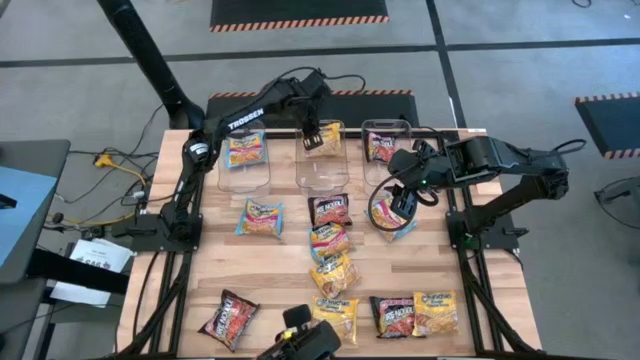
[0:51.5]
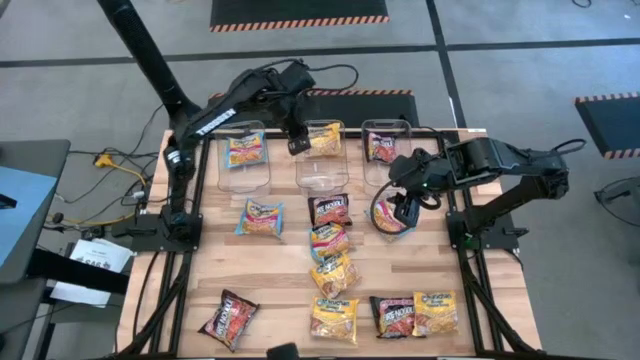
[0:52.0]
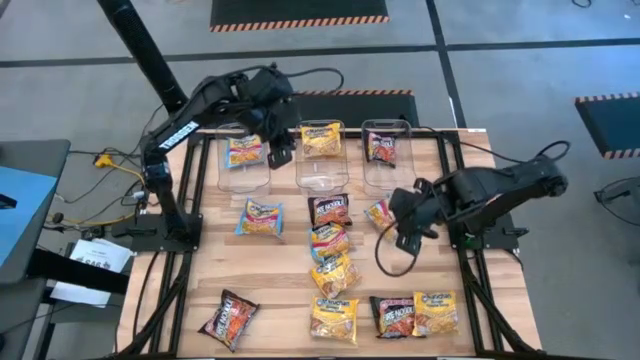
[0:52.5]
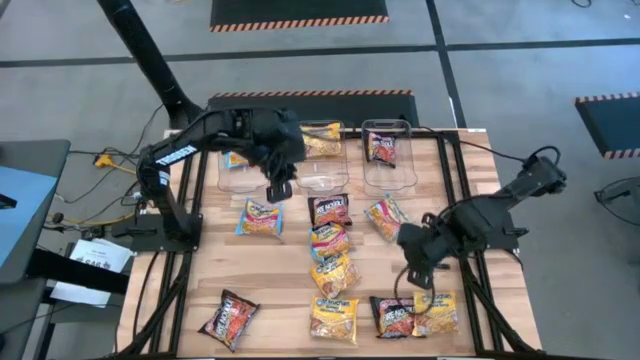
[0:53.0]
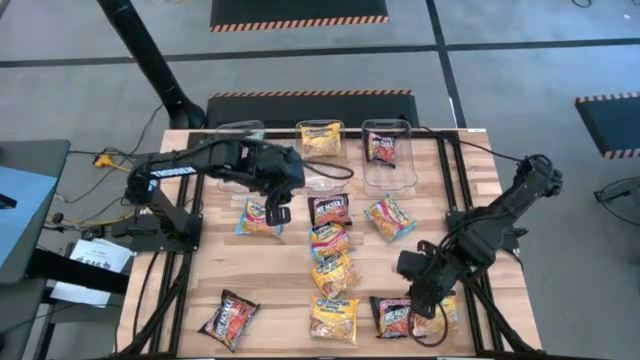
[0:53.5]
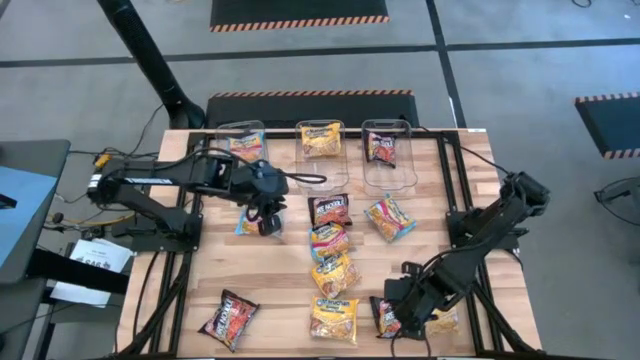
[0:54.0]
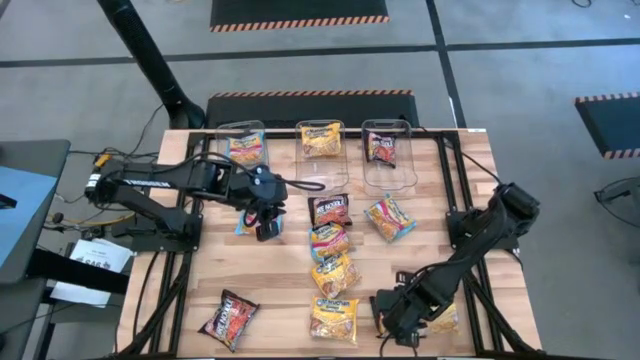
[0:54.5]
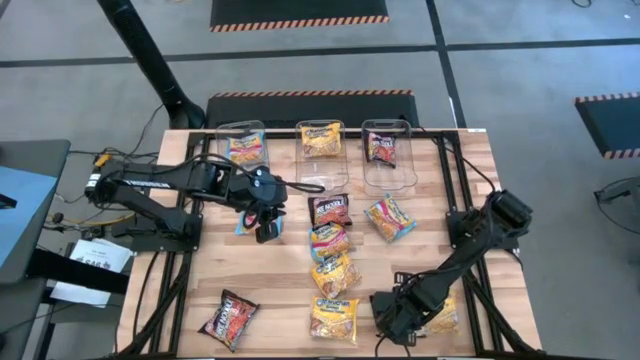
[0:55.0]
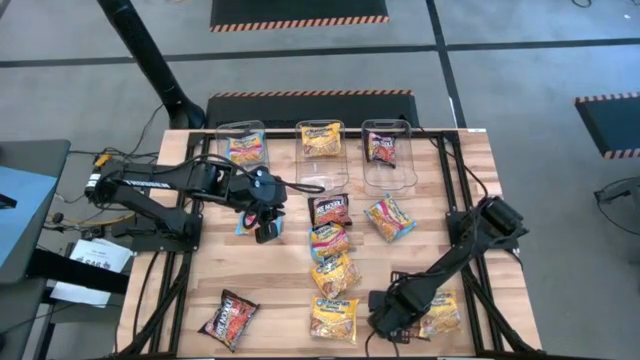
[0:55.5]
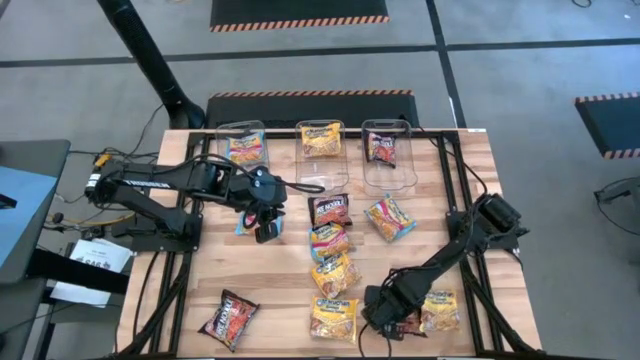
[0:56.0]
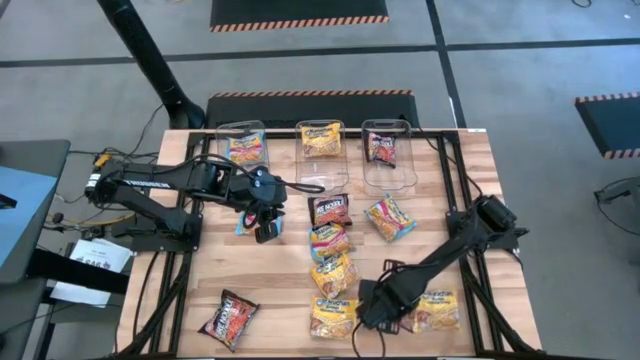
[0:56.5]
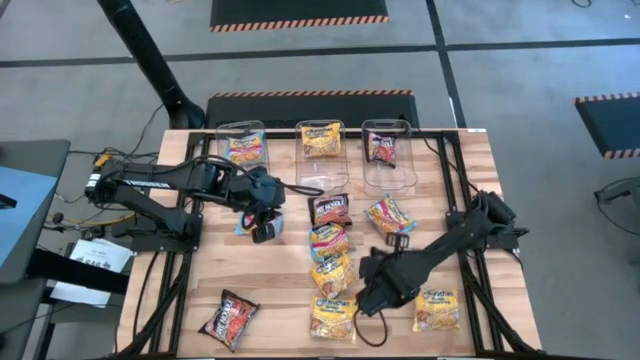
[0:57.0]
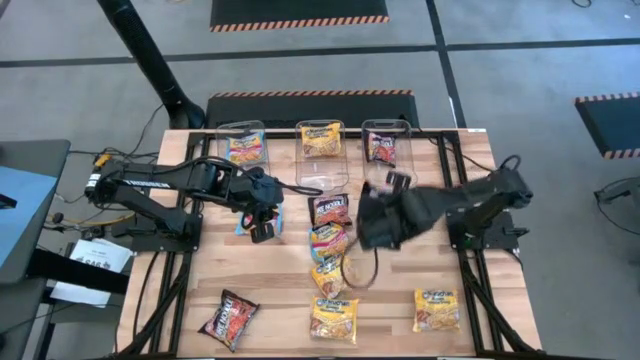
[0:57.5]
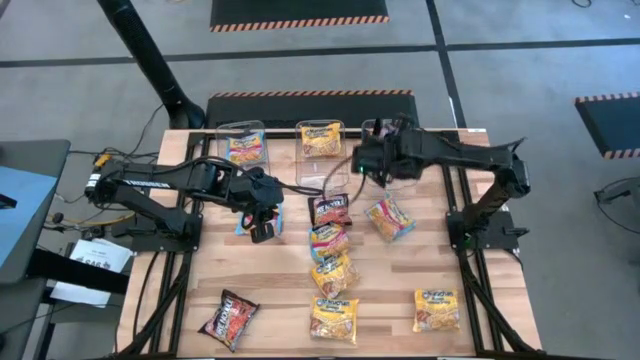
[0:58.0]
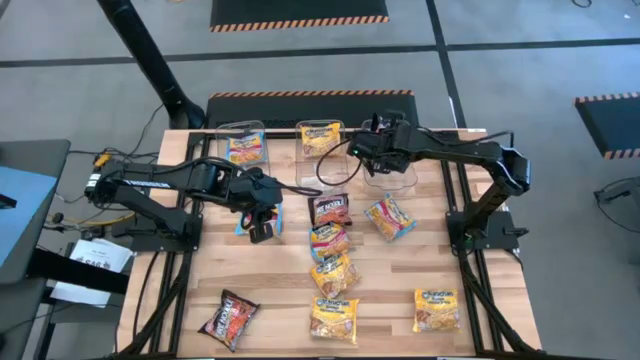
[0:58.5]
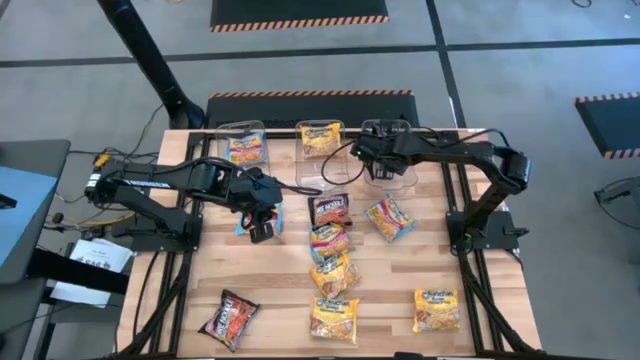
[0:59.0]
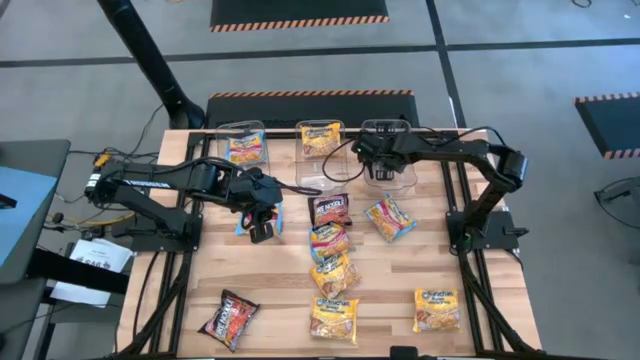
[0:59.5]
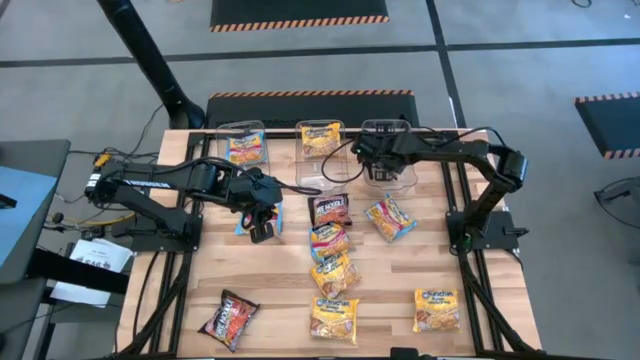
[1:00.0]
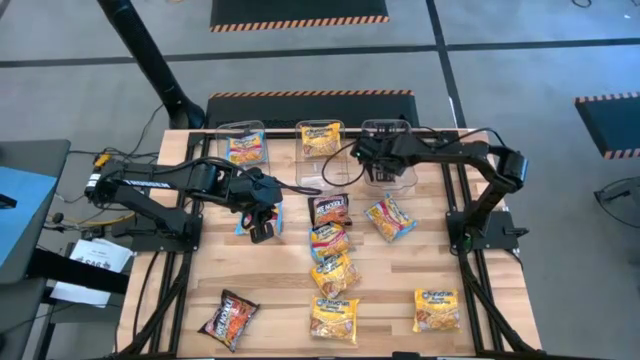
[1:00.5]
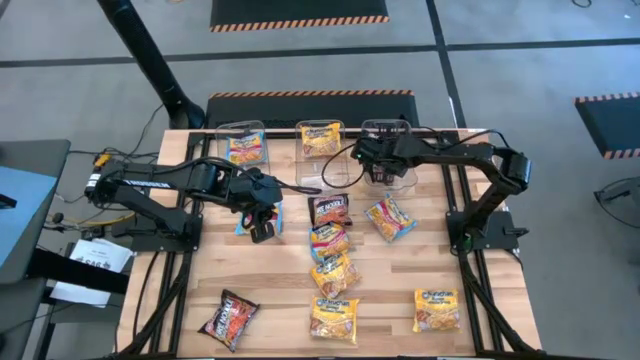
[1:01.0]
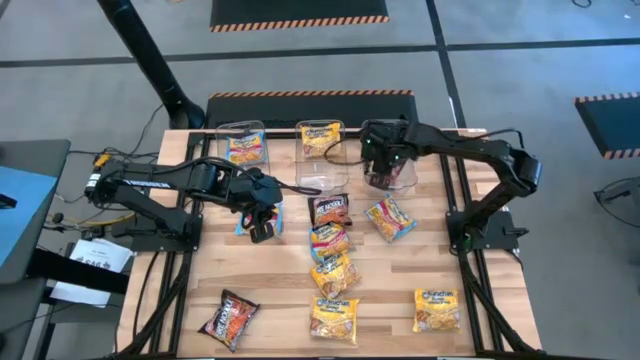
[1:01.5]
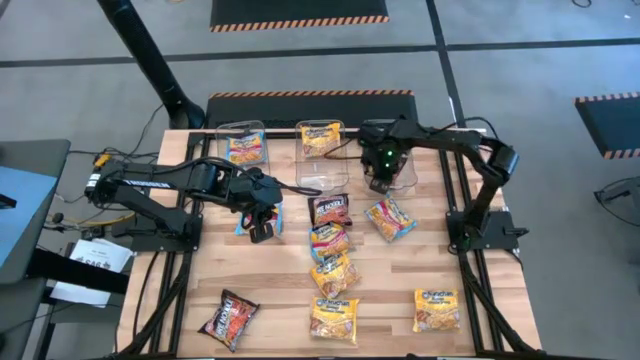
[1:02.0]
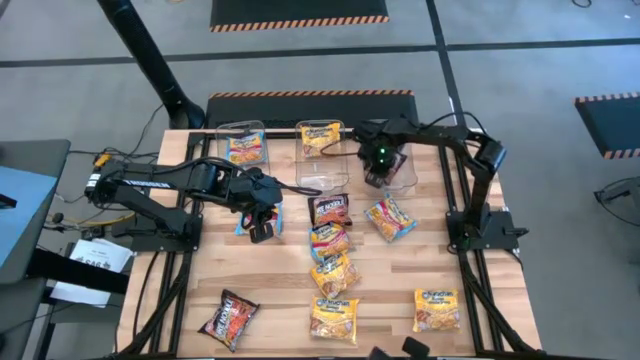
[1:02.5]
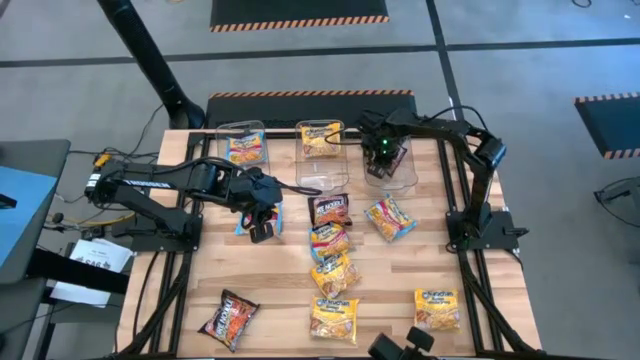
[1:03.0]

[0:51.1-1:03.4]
Task: Sort Maruchan noodles
Put the black noodle pack into the right transparent bin

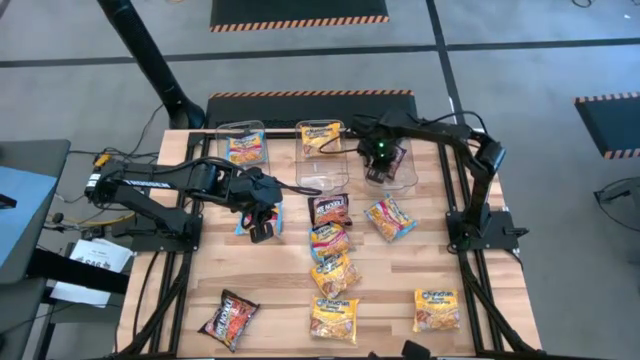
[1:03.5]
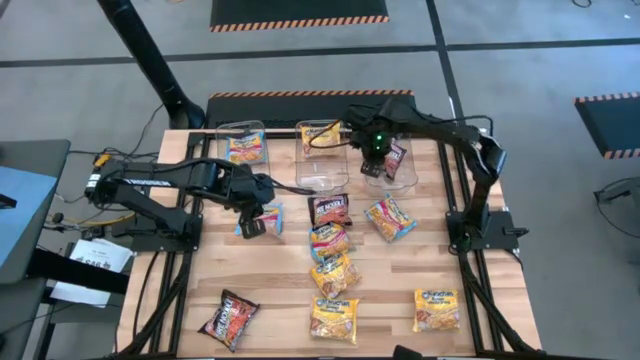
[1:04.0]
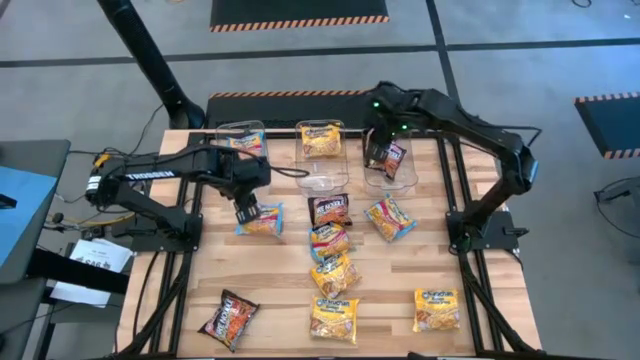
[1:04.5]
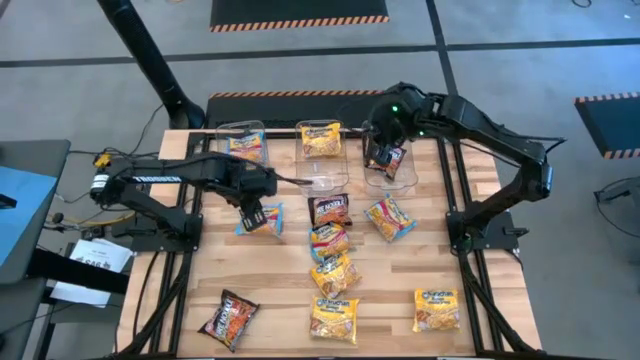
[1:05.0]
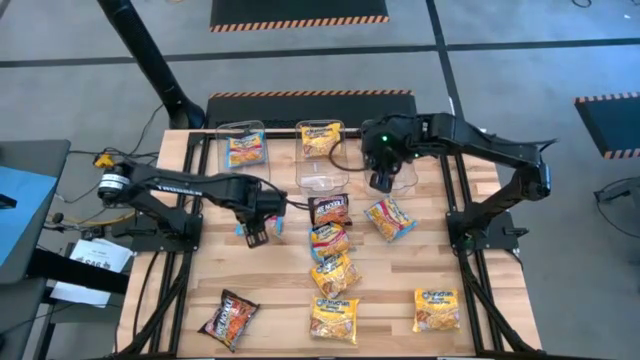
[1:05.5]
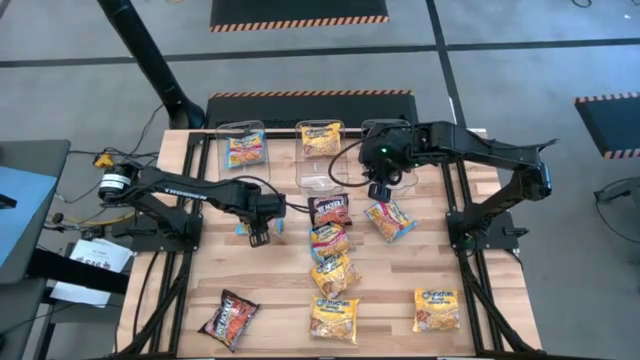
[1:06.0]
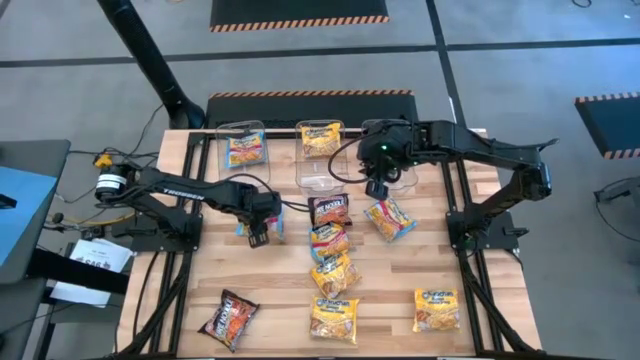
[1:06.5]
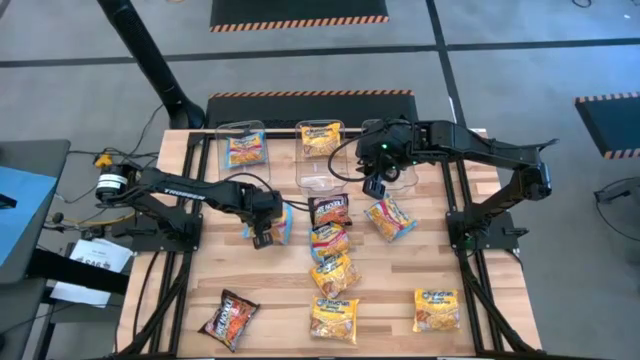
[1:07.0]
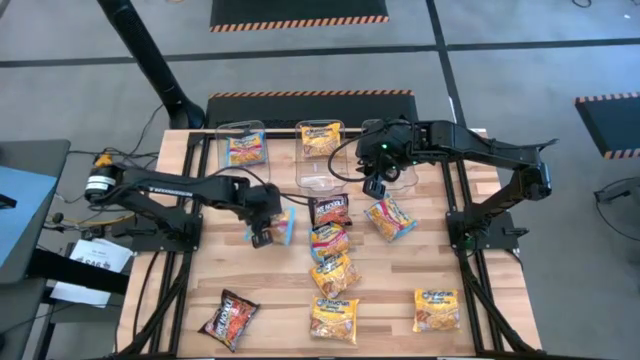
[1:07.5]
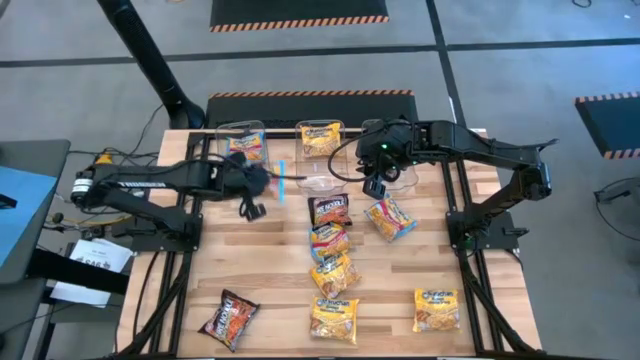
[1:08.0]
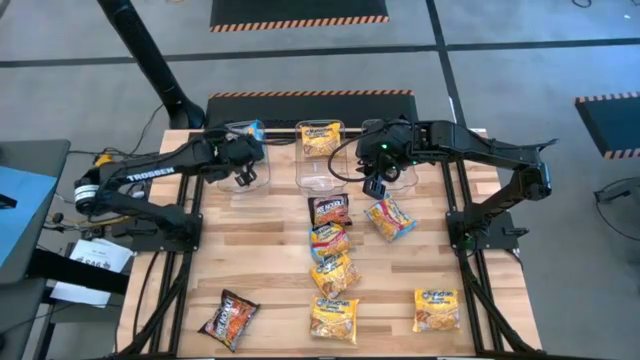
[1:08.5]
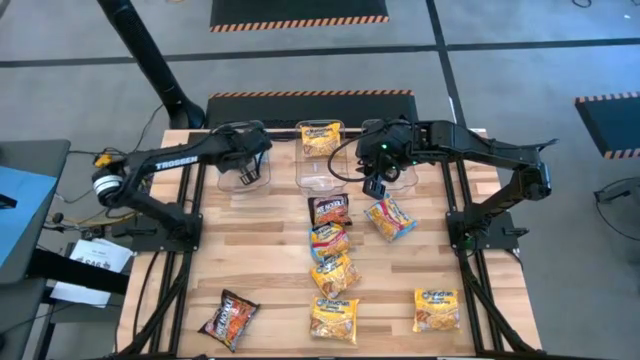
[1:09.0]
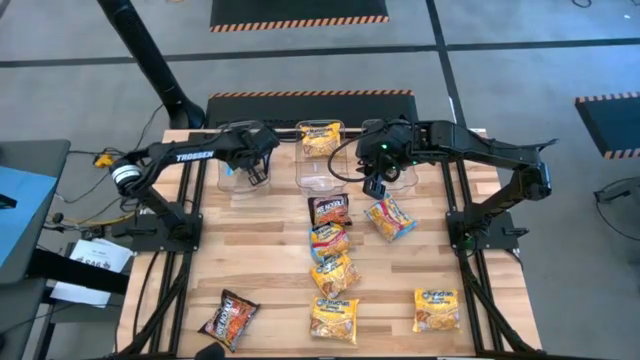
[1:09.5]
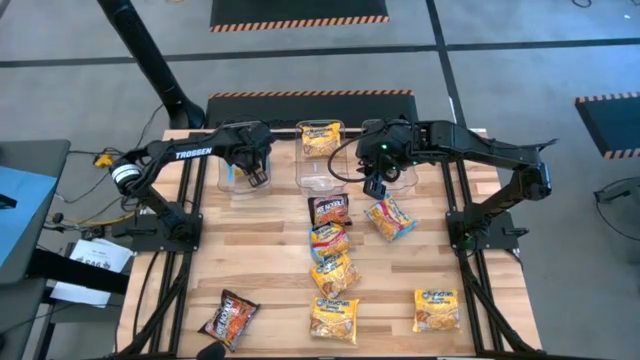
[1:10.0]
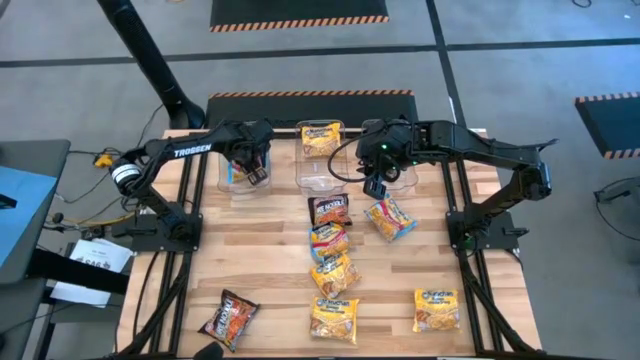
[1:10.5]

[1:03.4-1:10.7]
Put the blue noodle pack into the left transparent bin

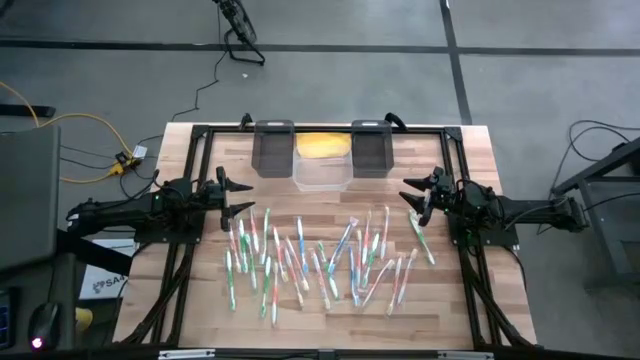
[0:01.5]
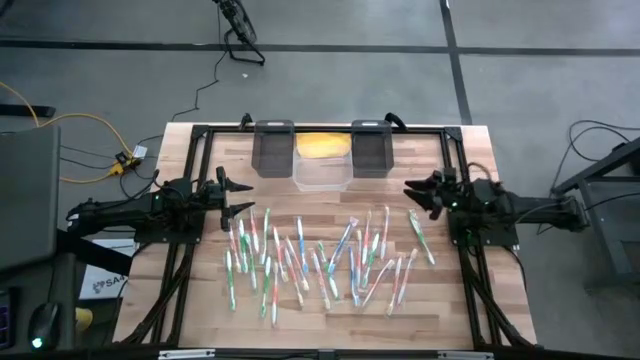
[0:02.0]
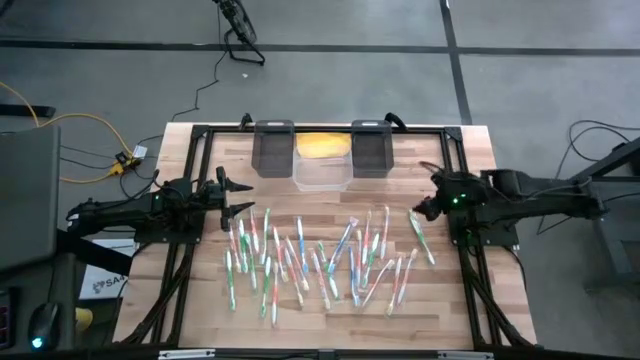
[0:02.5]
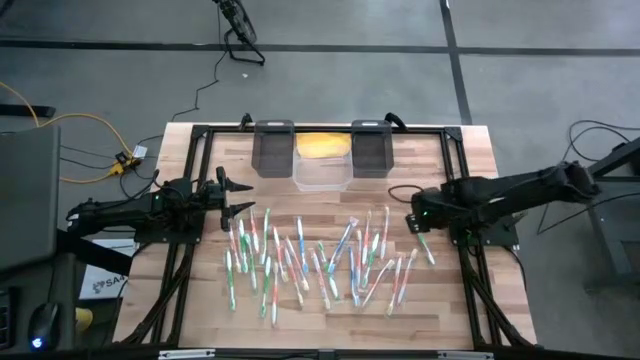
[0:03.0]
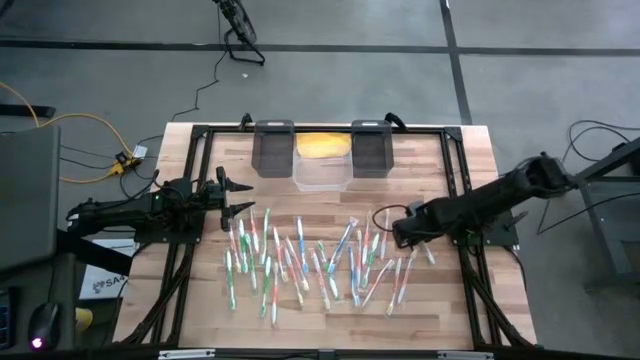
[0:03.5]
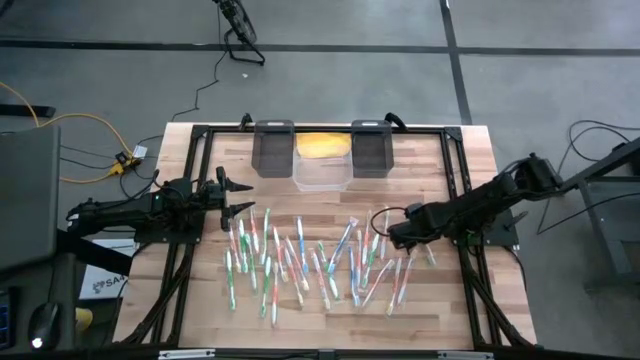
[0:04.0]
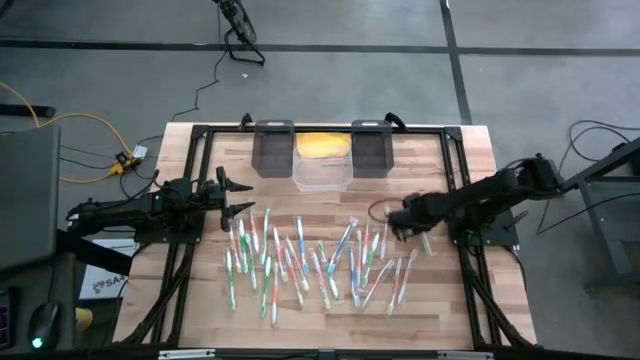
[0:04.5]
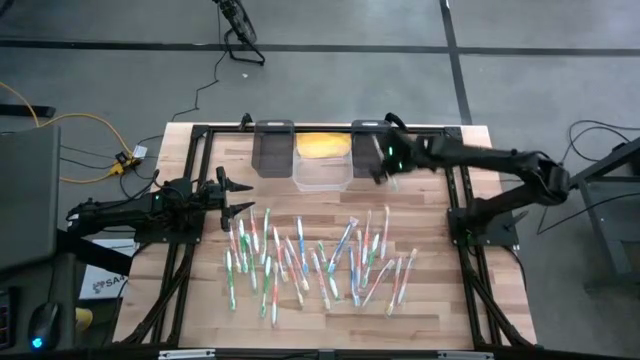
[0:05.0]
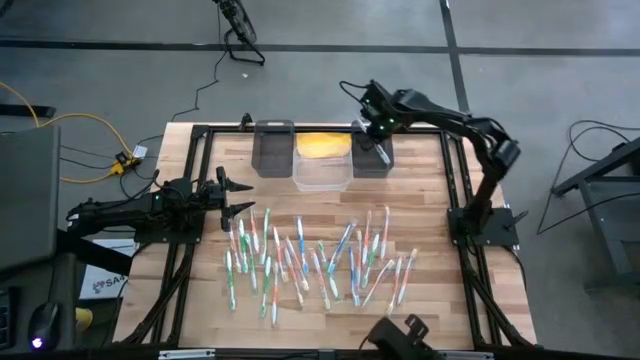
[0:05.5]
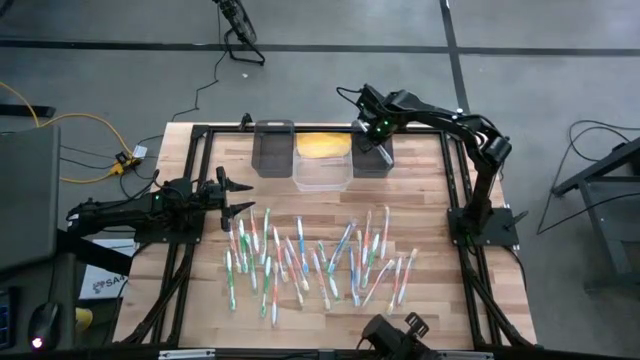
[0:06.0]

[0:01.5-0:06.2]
Task: Pick & Place Toothbrushes
Put the green toothbrush into the right black bin
